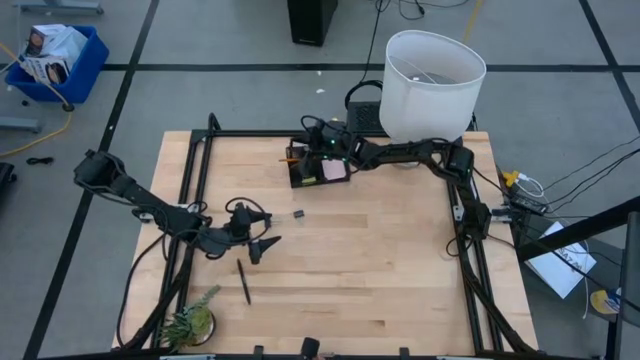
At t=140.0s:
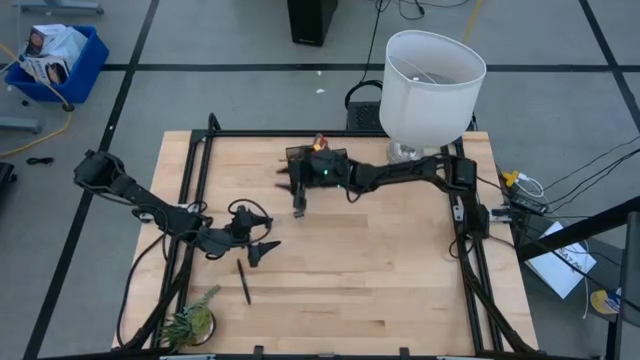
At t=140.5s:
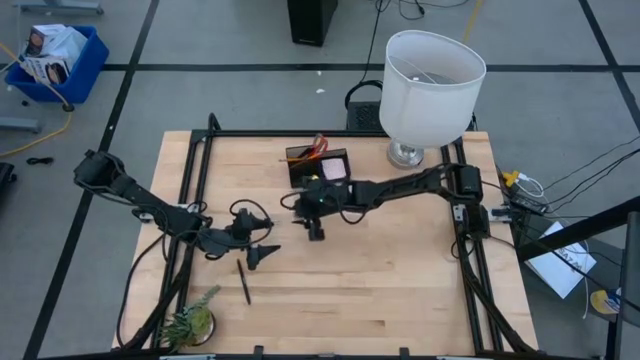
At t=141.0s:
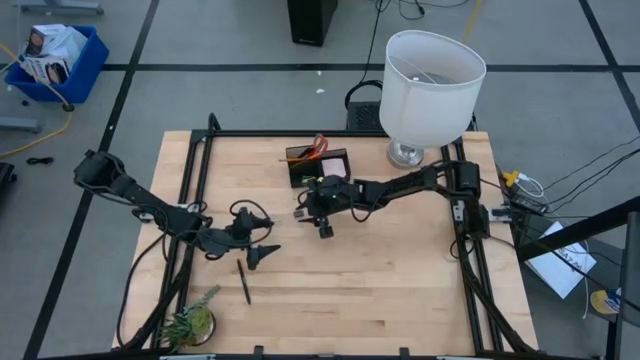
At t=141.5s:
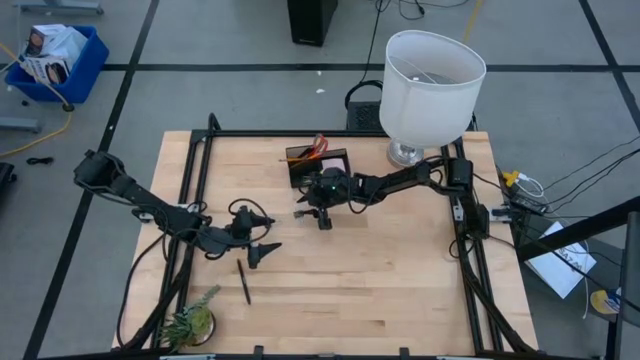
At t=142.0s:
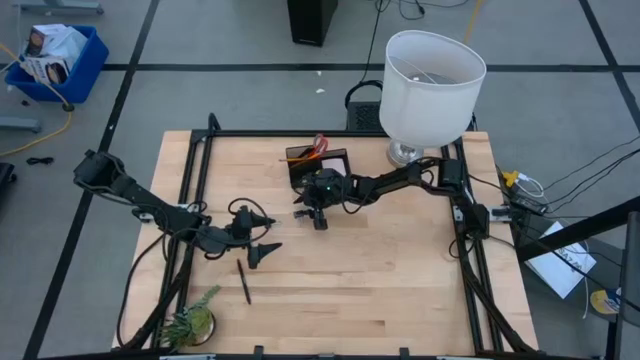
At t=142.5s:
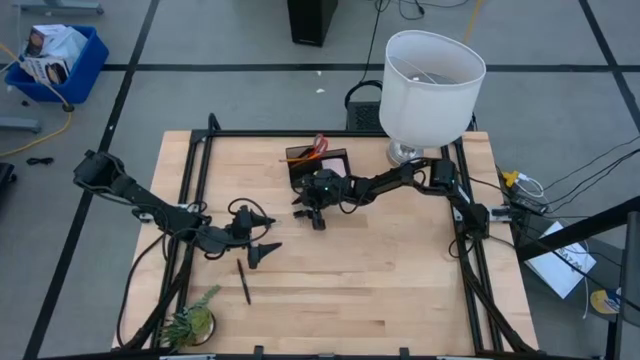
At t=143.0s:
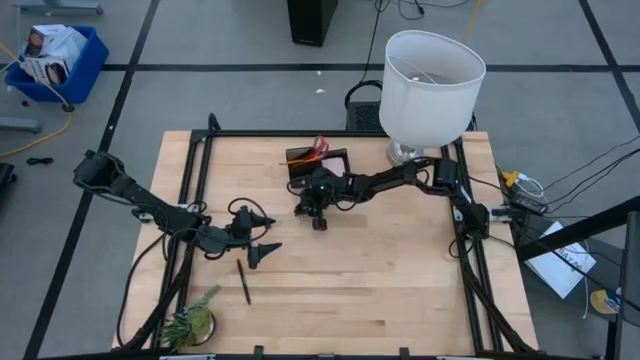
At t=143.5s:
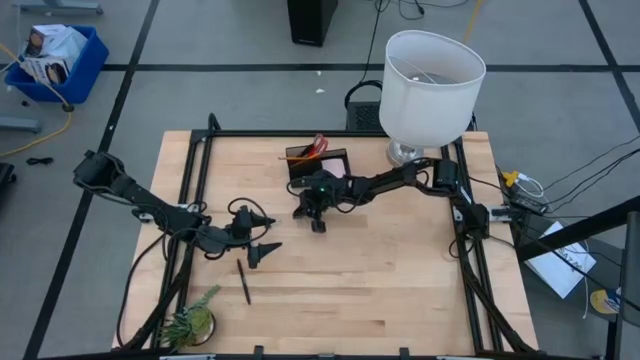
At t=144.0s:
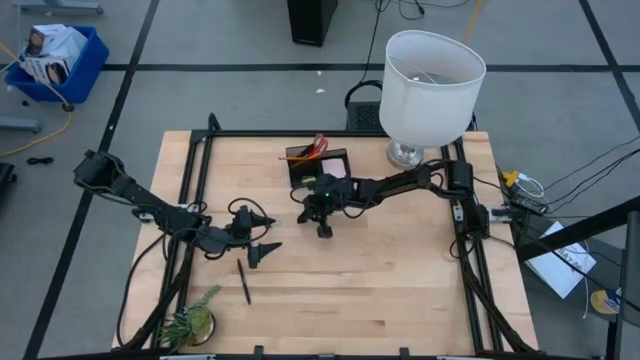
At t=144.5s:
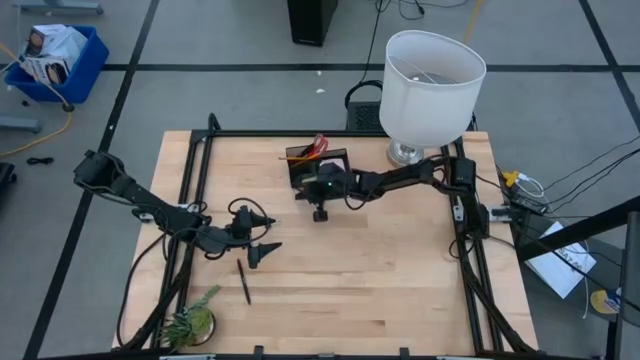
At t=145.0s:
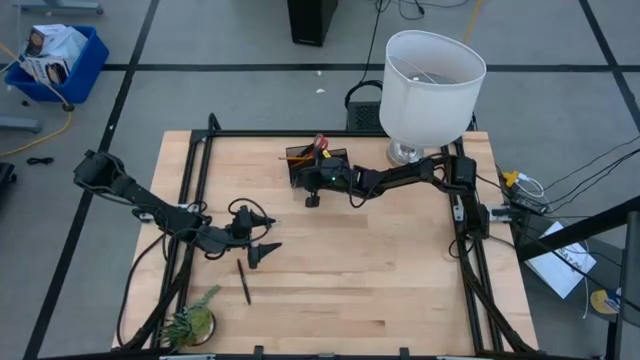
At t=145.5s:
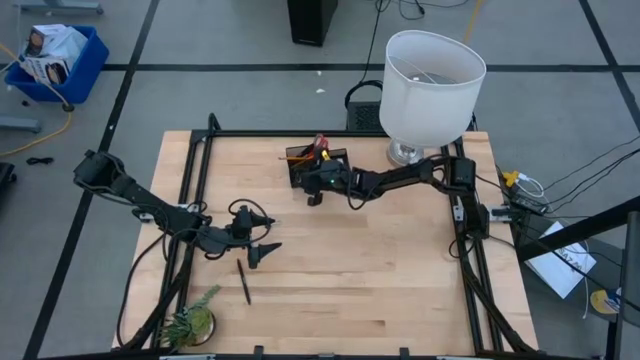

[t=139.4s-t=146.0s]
Task: Pick and place office supplies into organizer
Put the black binder clip into the black desk organizer

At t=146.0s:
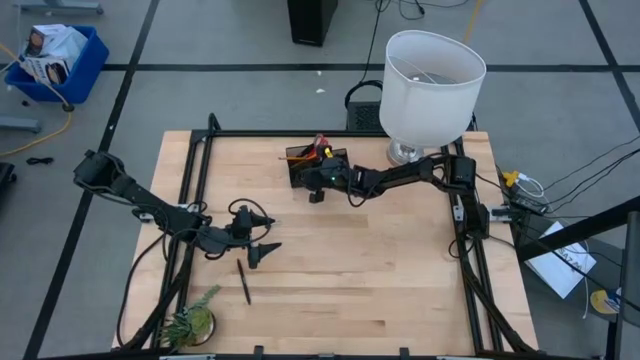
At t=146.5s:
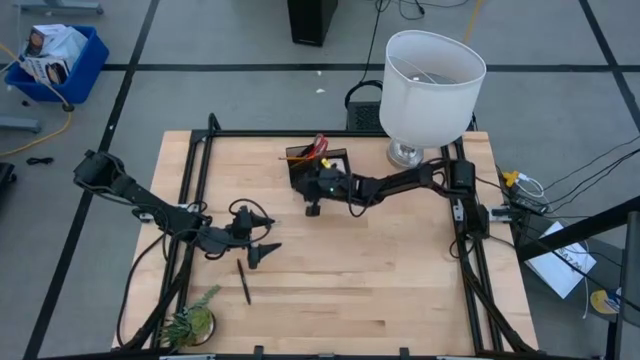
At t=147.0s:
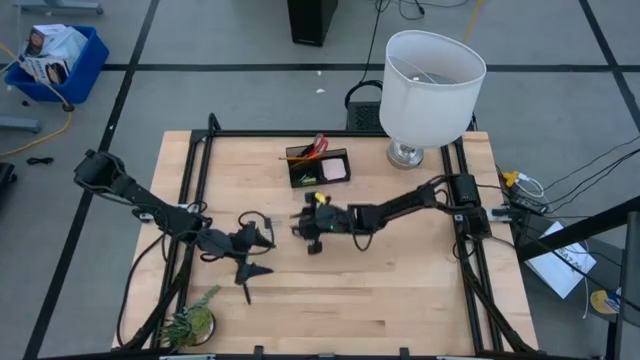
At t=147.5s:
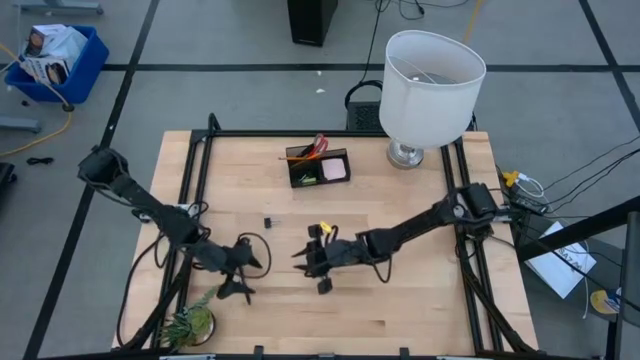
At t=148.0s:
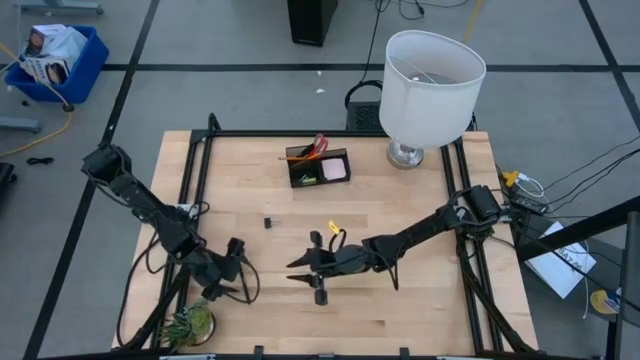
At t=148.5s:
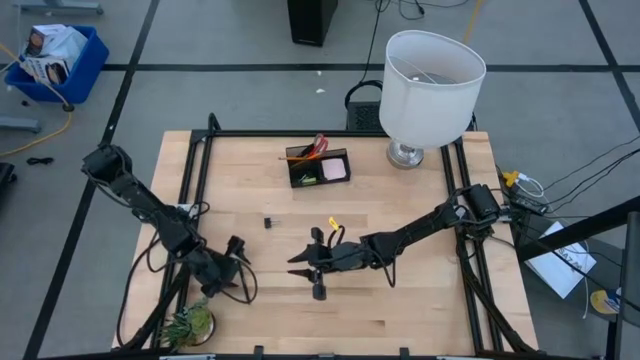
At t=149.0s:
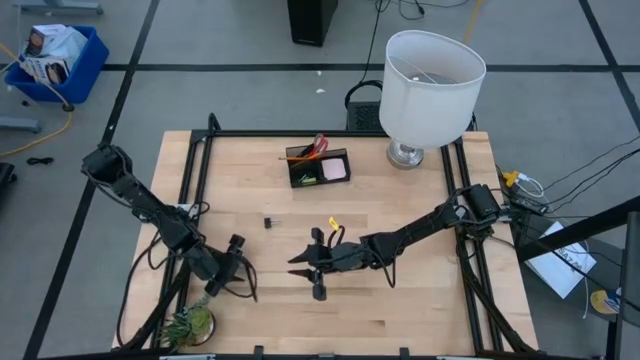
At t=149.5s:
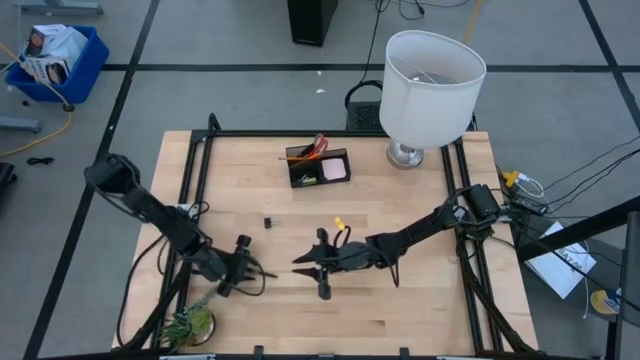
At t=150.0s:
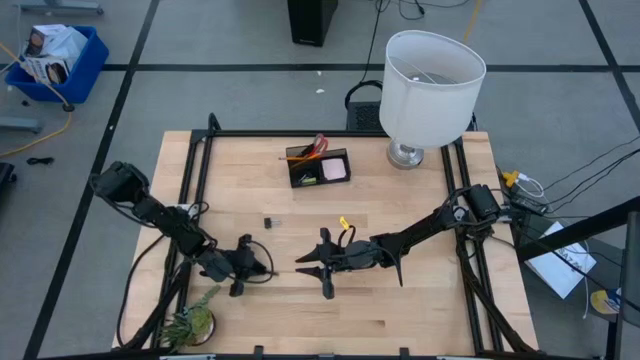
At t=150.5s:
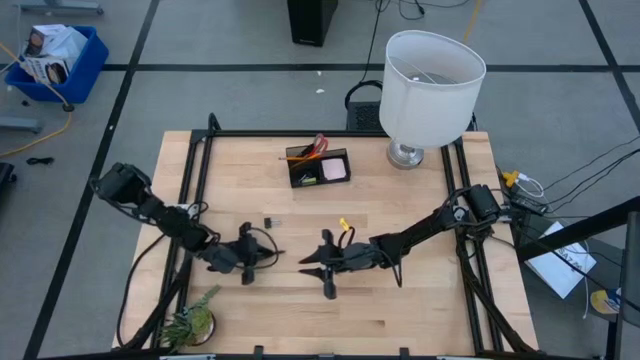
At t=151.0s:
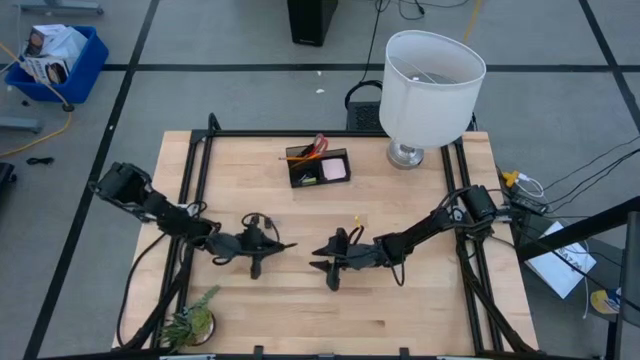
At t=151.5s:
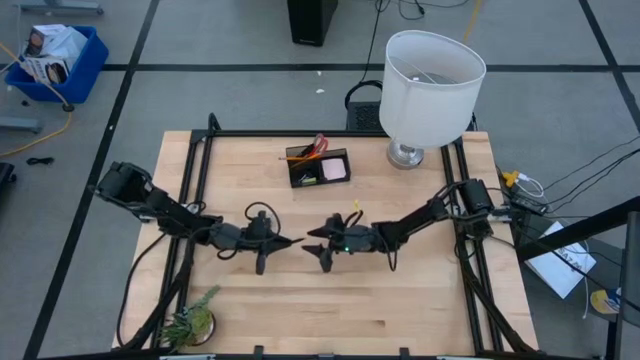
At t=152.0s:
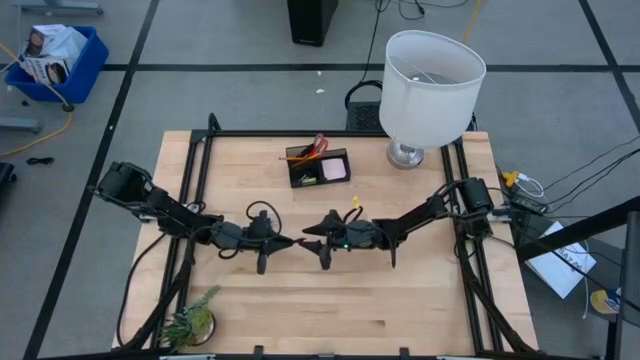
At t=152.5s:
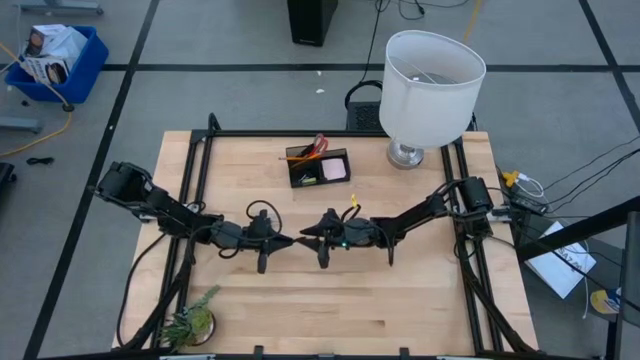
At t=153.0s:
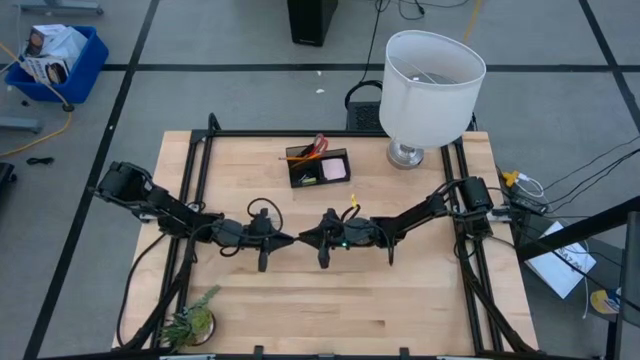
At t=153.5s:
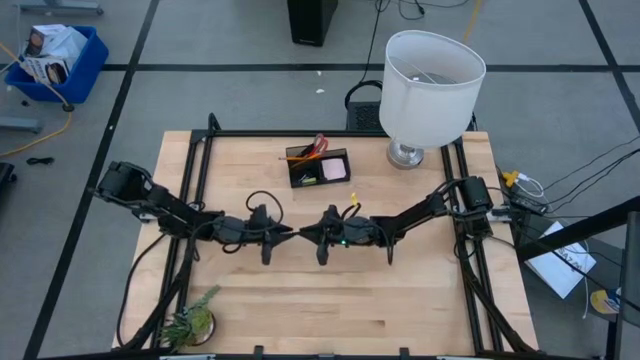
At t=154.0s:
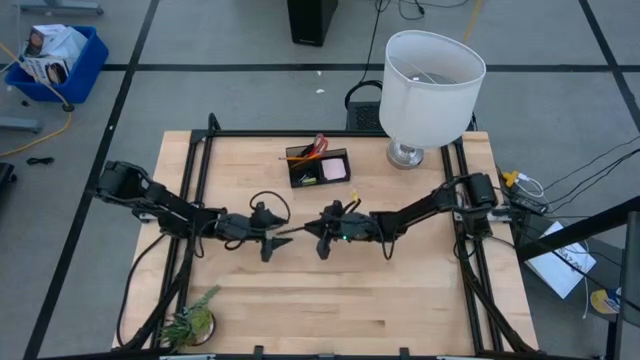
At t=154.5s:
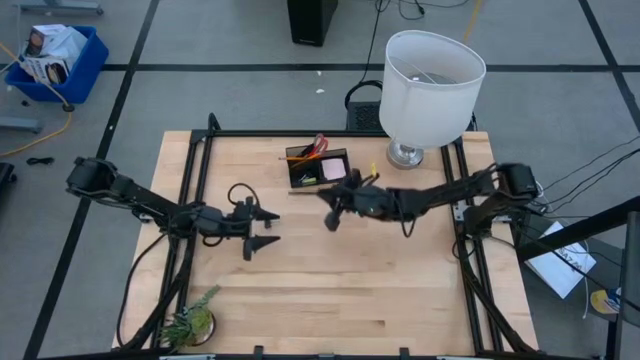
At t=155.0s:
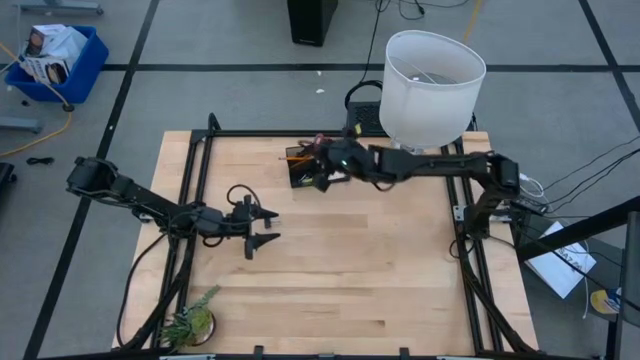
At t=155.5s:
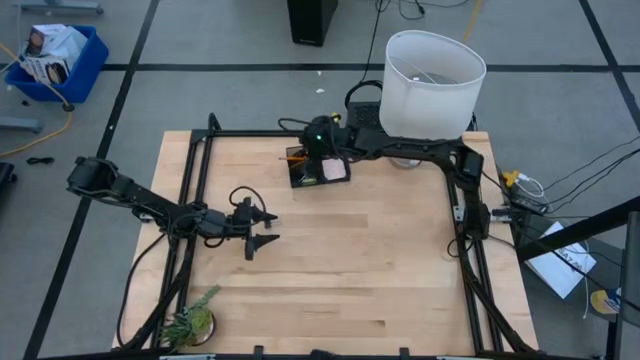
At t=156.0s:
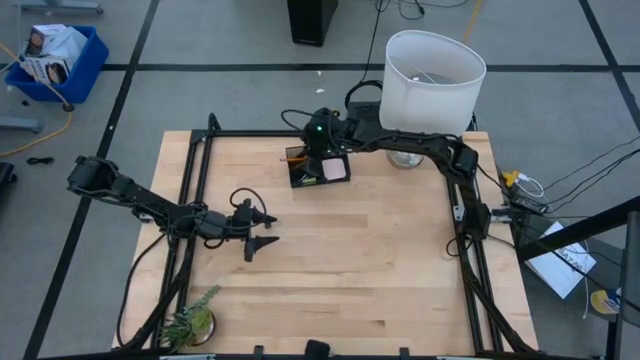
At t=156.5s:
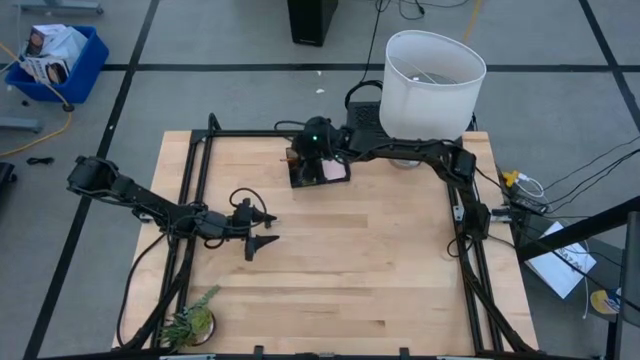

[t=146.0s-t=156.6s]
Put the black pen into the black desk organizer

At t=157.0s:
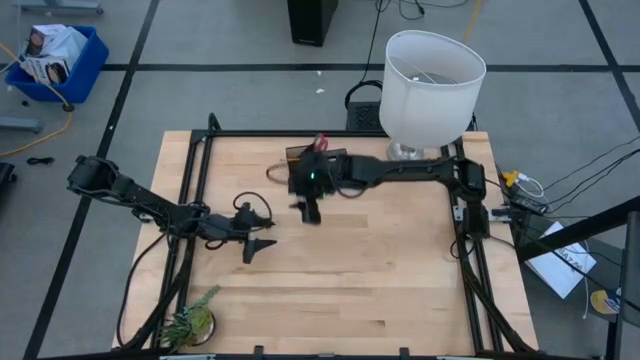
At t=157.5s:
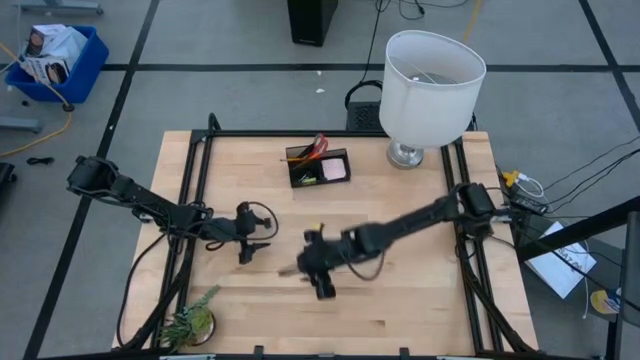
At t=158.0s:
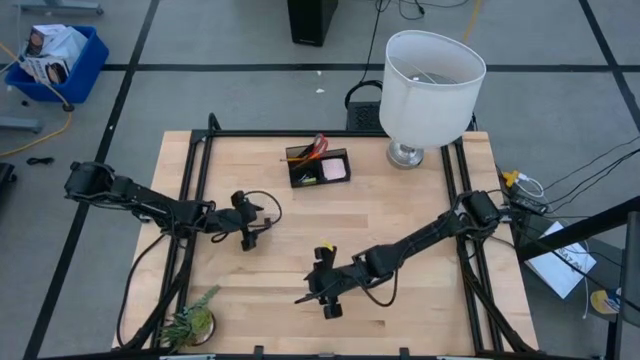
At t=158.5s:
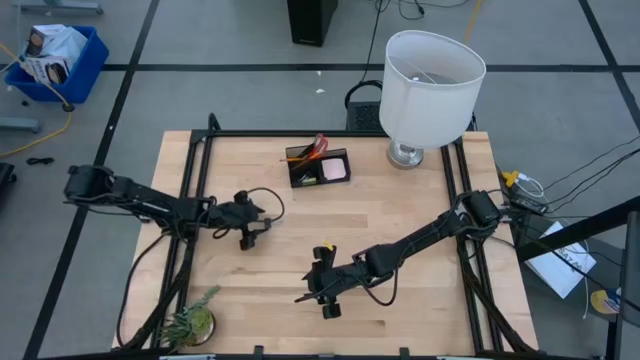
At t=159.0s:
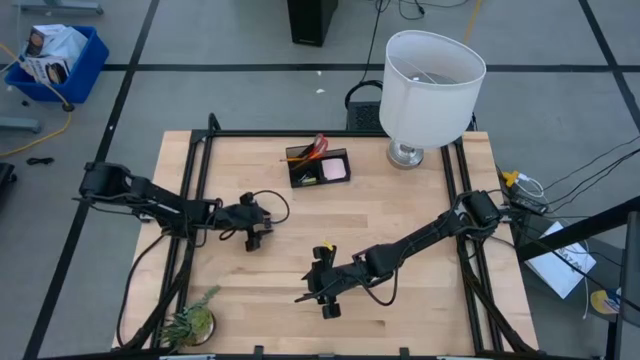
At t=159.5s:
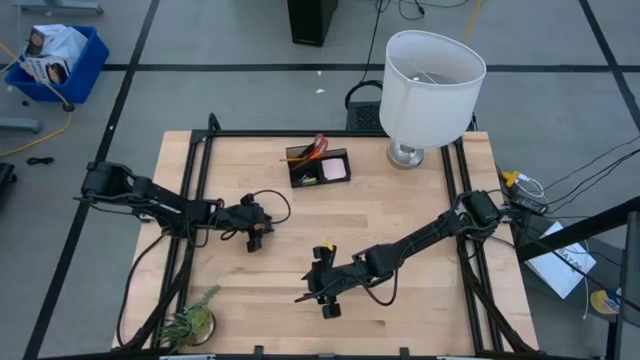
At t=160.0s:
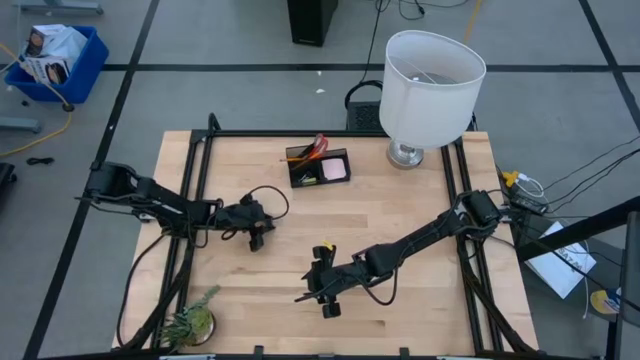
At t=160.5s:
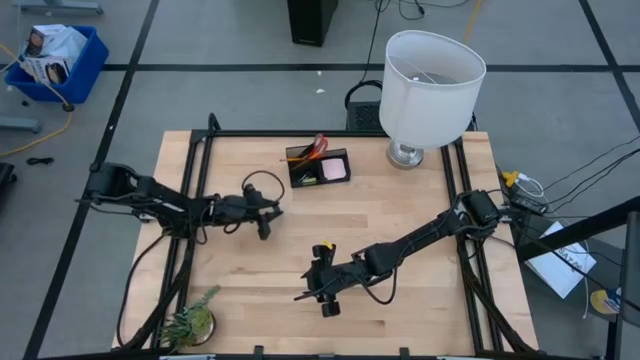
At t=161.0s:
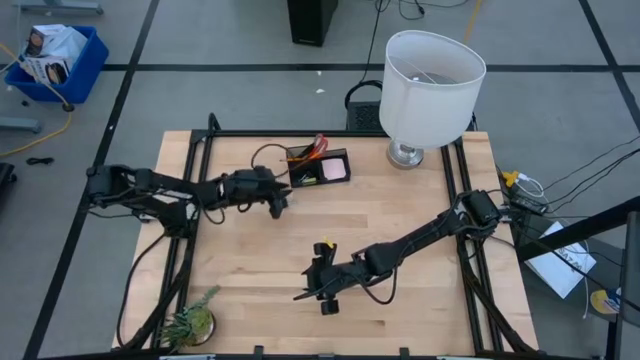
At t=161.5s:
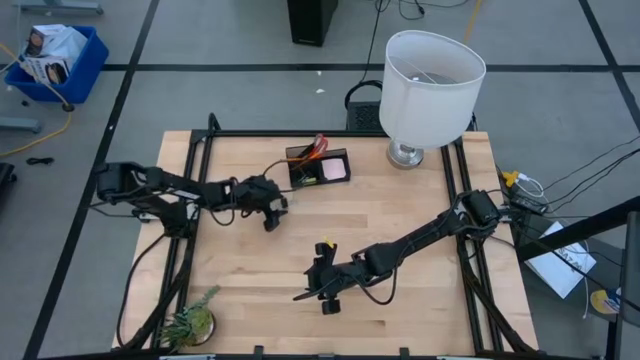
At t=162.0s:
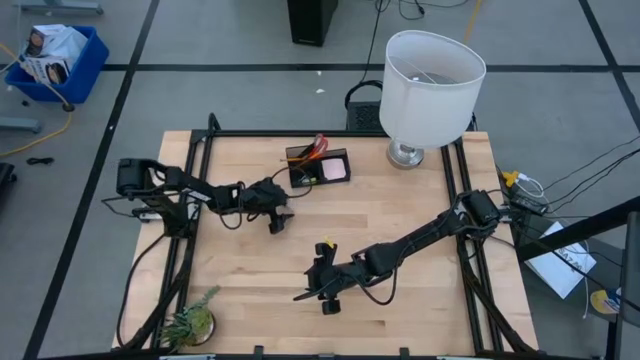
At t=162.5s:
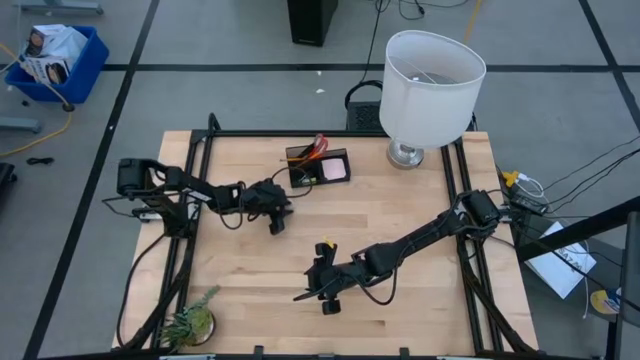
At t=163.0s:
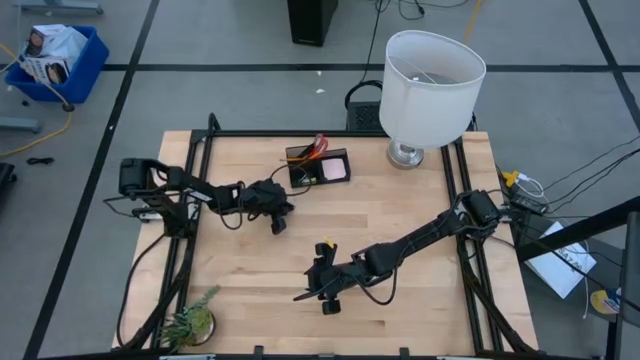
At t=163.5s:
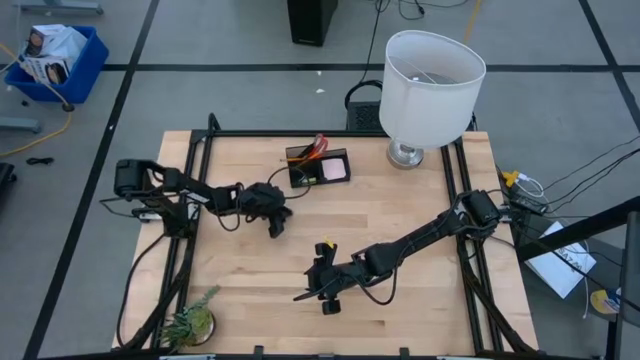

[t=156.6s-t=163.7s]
Put the black binder clip into the black desk organizer
